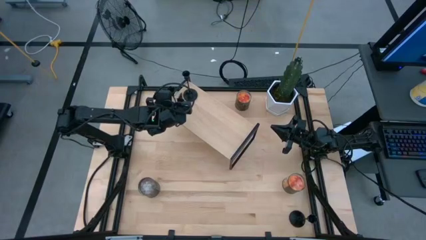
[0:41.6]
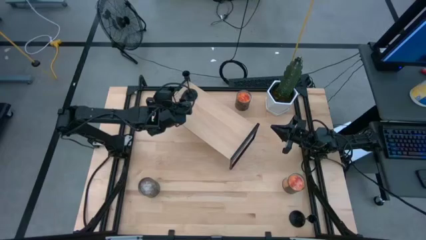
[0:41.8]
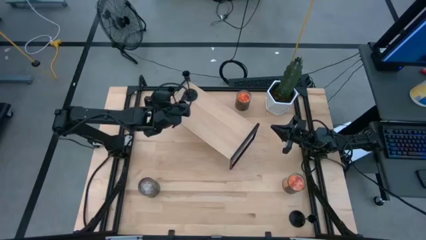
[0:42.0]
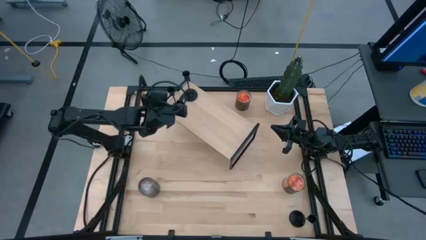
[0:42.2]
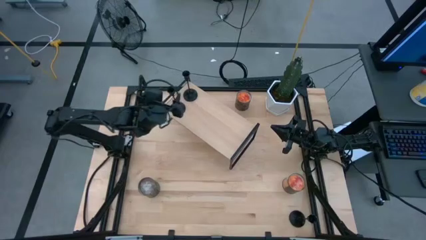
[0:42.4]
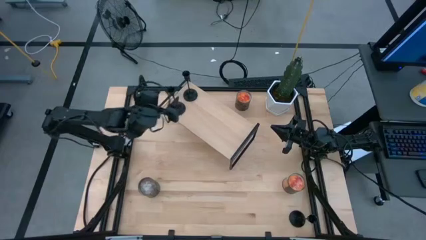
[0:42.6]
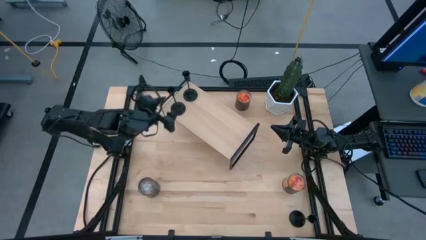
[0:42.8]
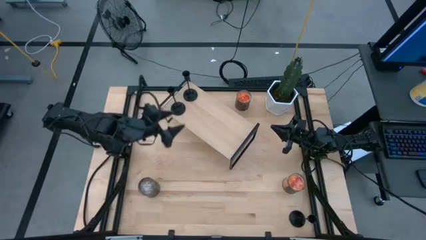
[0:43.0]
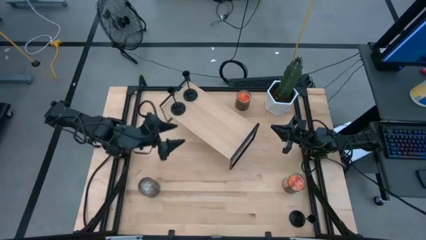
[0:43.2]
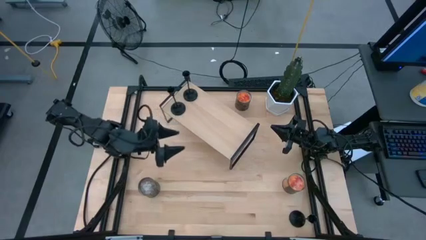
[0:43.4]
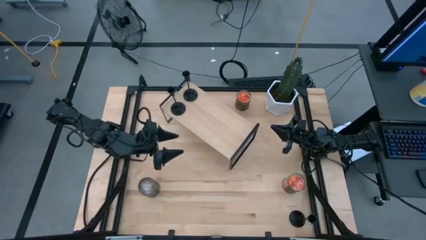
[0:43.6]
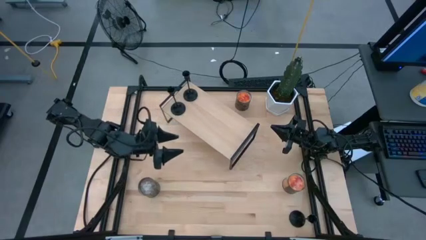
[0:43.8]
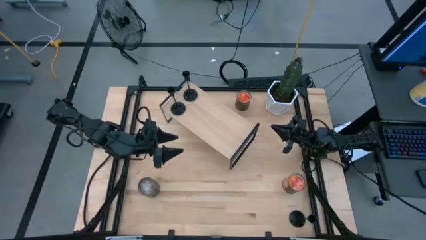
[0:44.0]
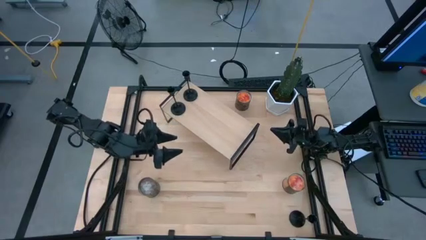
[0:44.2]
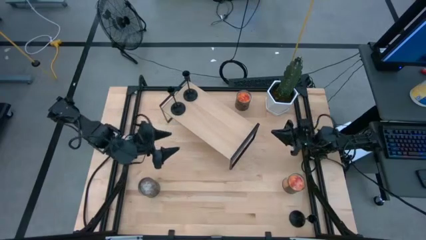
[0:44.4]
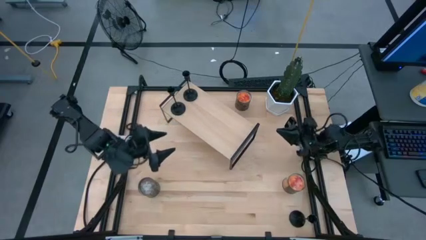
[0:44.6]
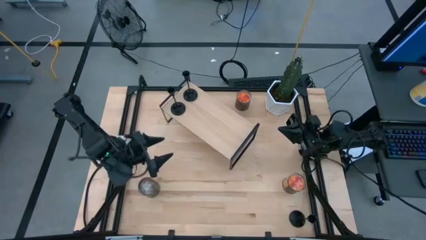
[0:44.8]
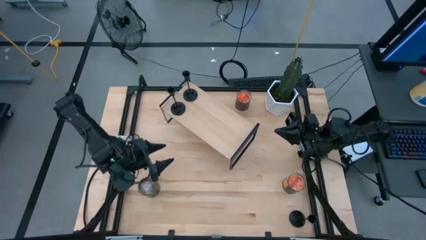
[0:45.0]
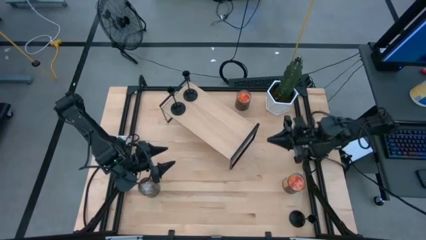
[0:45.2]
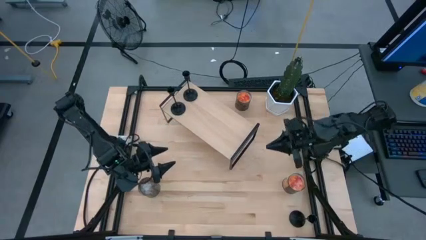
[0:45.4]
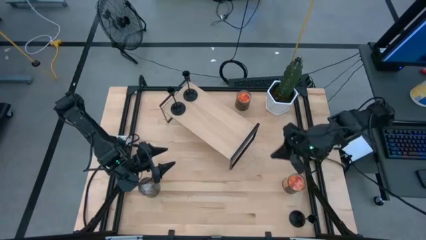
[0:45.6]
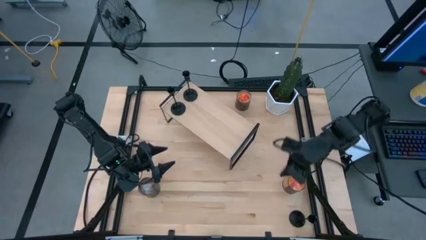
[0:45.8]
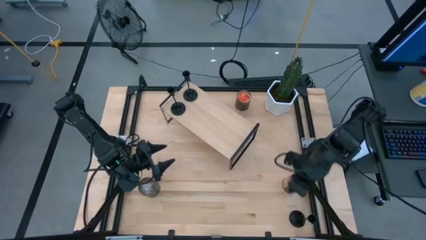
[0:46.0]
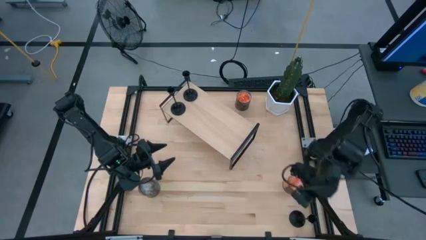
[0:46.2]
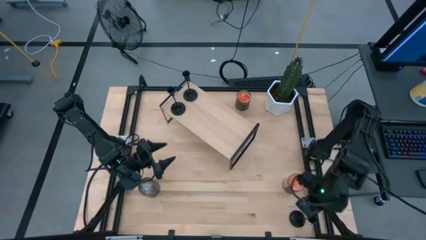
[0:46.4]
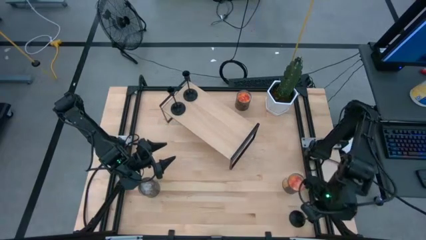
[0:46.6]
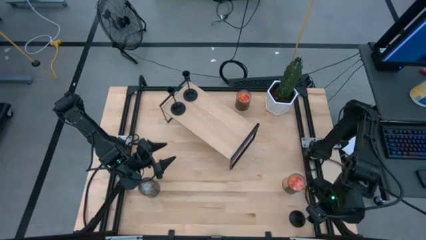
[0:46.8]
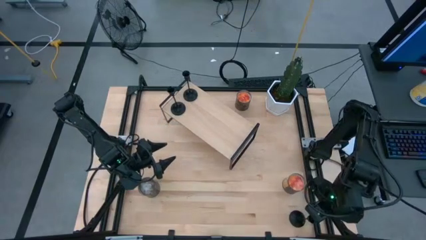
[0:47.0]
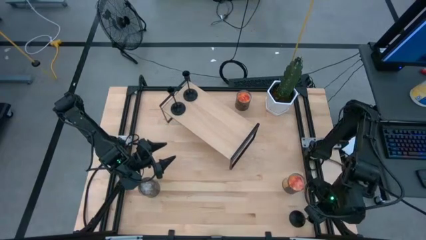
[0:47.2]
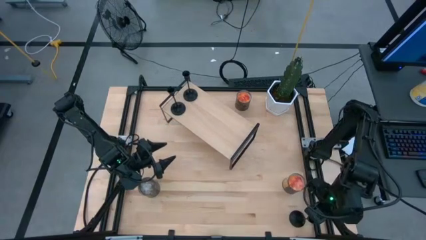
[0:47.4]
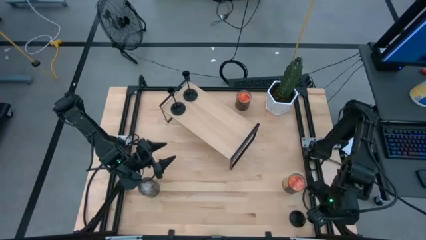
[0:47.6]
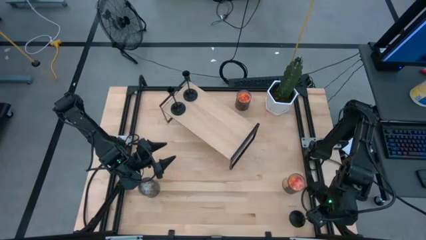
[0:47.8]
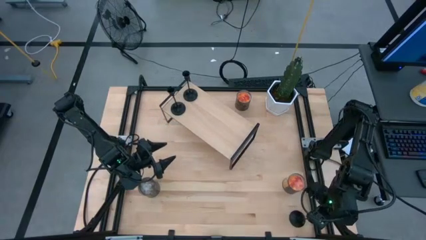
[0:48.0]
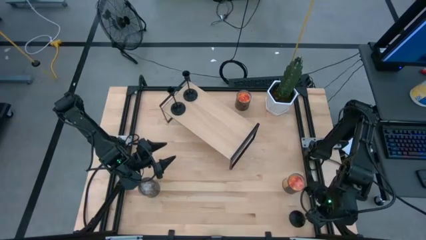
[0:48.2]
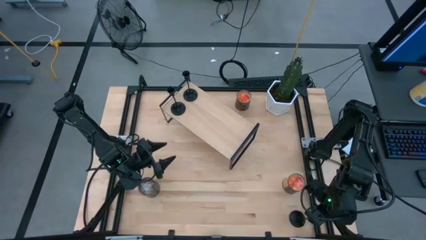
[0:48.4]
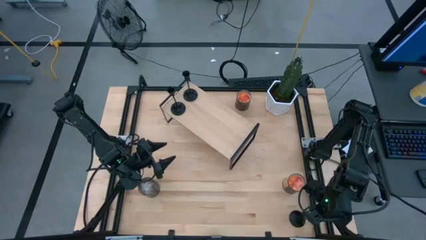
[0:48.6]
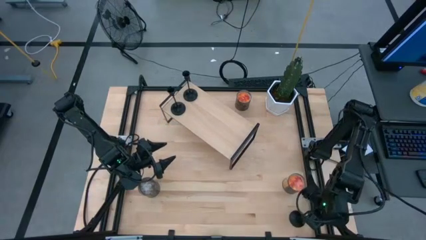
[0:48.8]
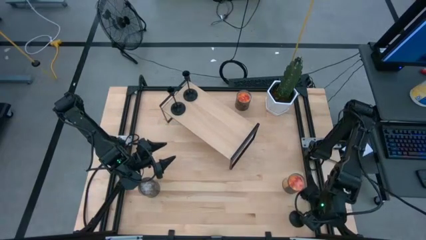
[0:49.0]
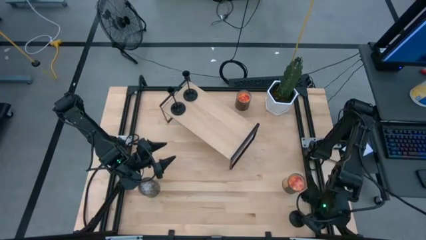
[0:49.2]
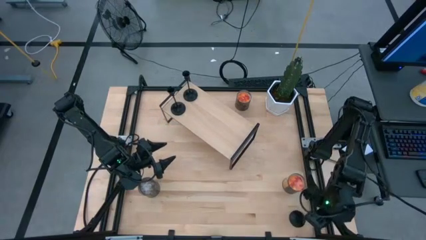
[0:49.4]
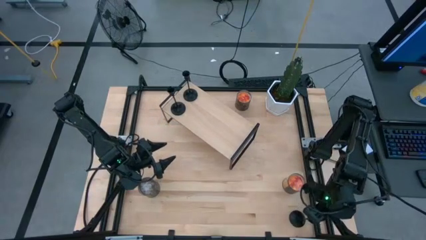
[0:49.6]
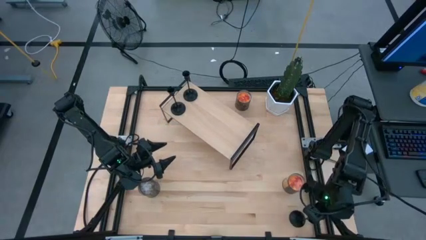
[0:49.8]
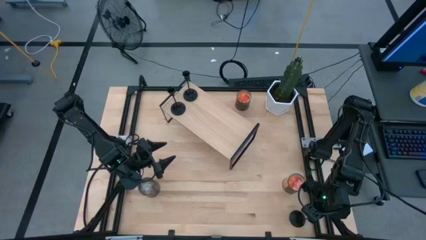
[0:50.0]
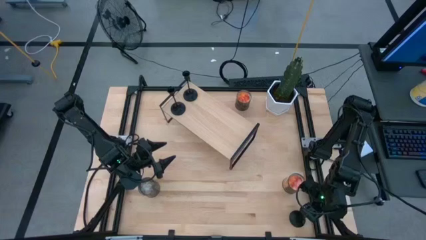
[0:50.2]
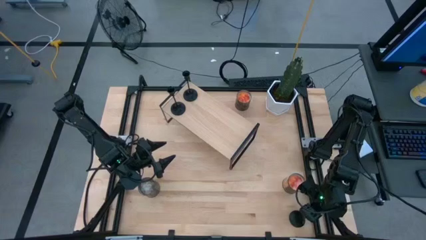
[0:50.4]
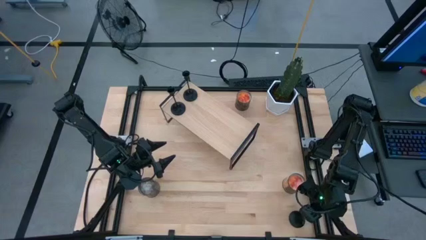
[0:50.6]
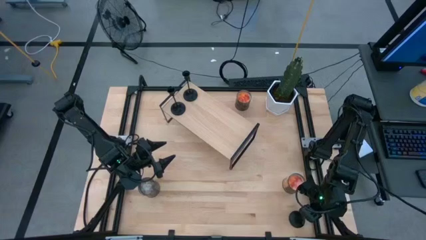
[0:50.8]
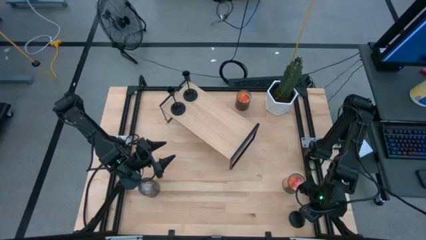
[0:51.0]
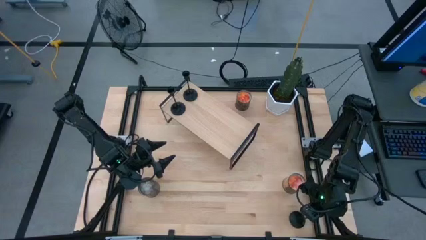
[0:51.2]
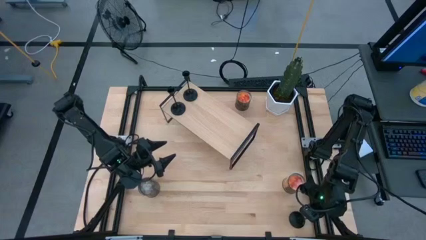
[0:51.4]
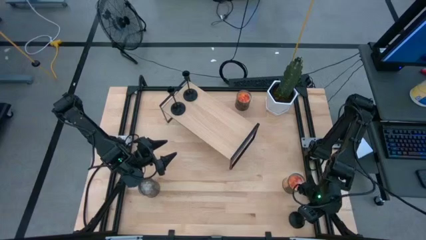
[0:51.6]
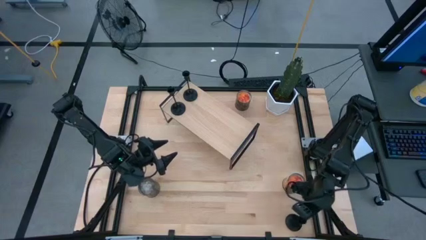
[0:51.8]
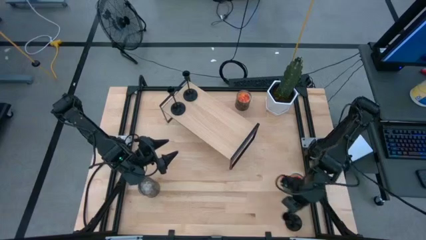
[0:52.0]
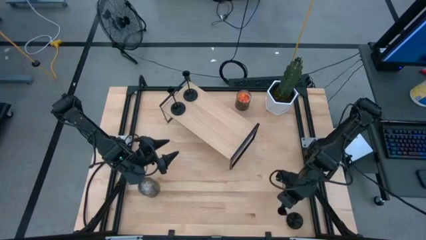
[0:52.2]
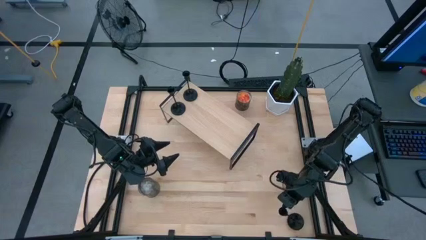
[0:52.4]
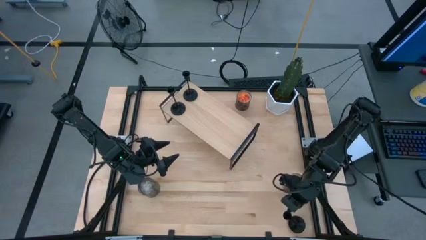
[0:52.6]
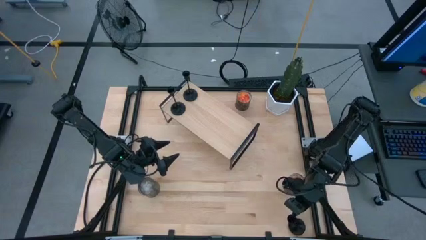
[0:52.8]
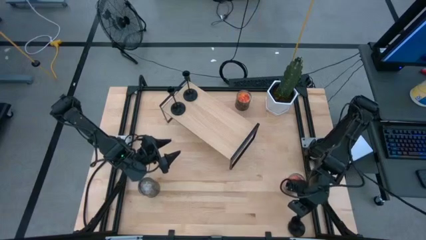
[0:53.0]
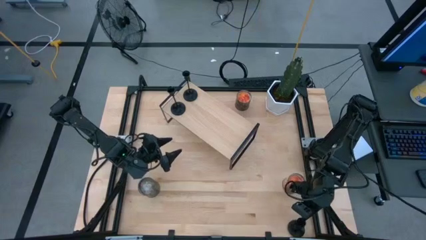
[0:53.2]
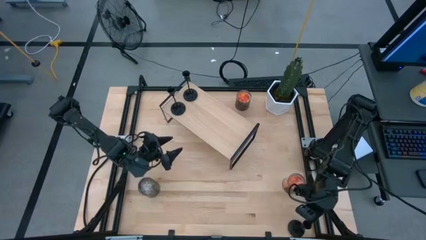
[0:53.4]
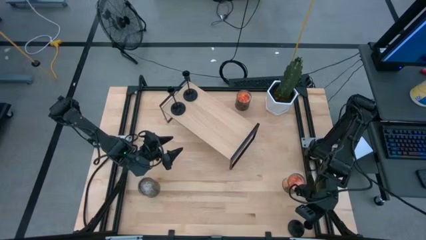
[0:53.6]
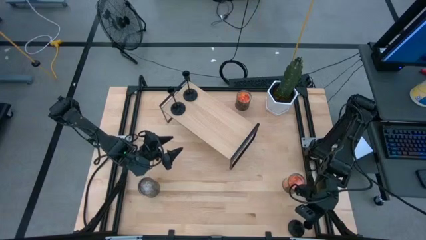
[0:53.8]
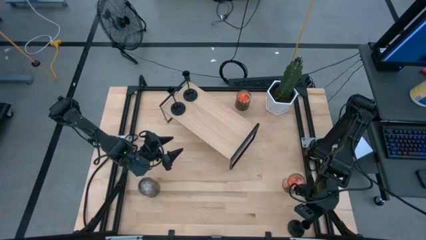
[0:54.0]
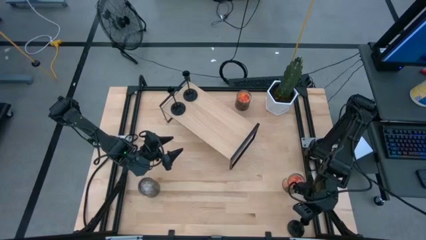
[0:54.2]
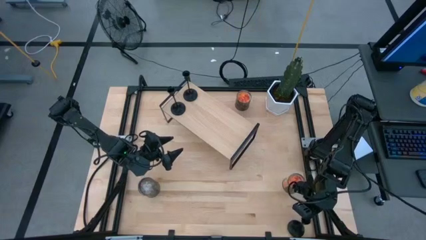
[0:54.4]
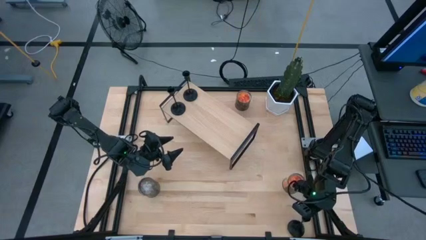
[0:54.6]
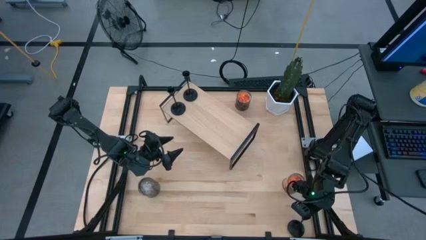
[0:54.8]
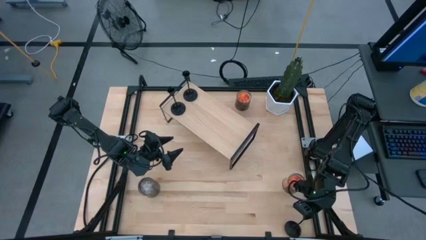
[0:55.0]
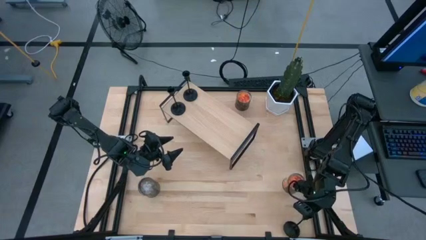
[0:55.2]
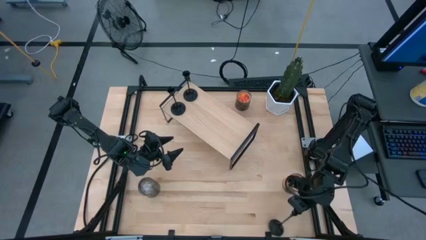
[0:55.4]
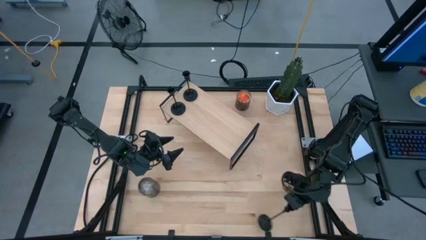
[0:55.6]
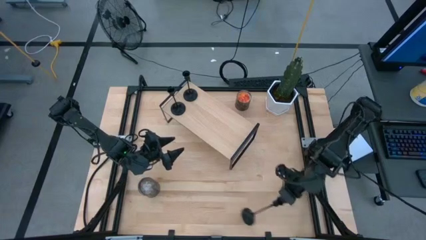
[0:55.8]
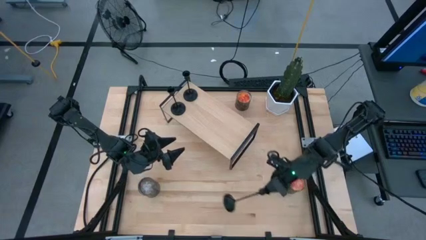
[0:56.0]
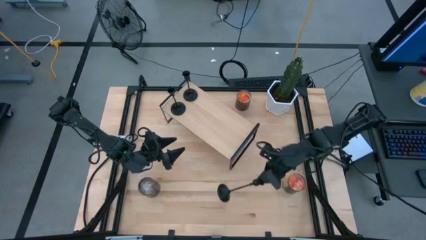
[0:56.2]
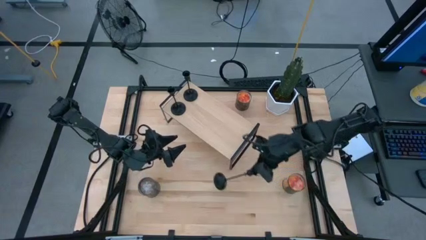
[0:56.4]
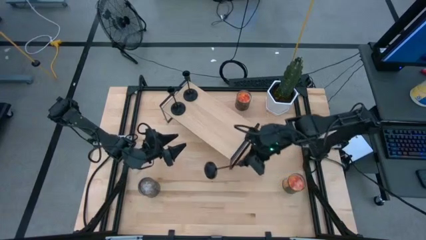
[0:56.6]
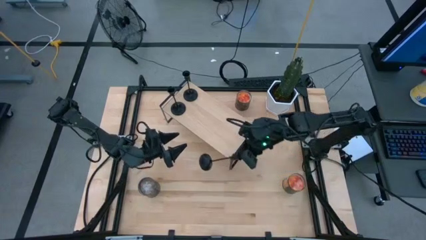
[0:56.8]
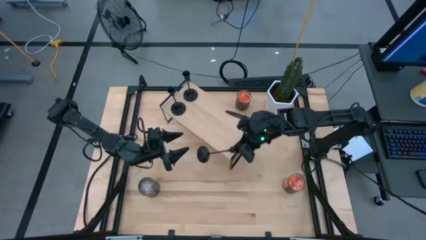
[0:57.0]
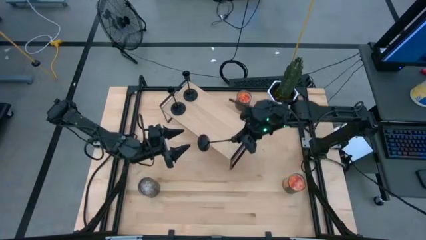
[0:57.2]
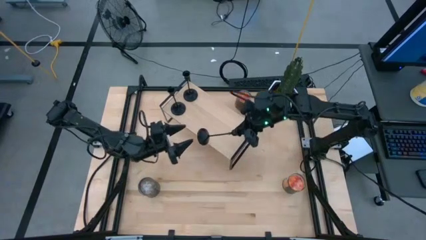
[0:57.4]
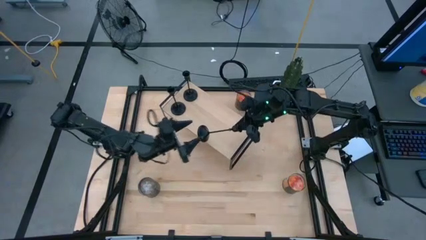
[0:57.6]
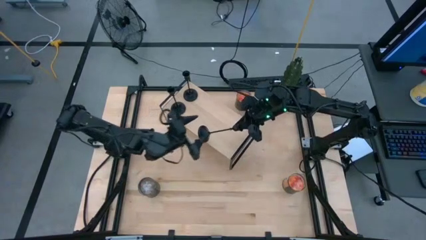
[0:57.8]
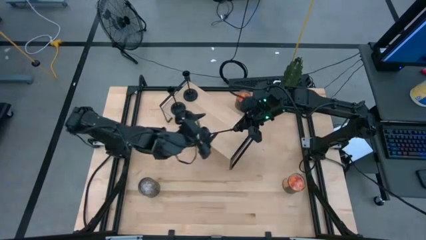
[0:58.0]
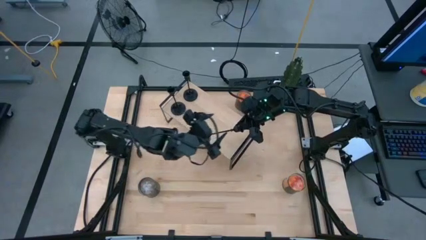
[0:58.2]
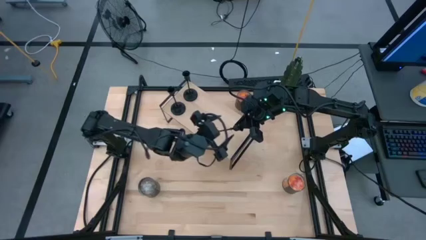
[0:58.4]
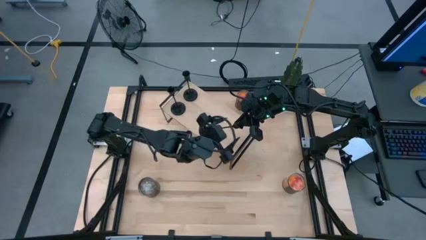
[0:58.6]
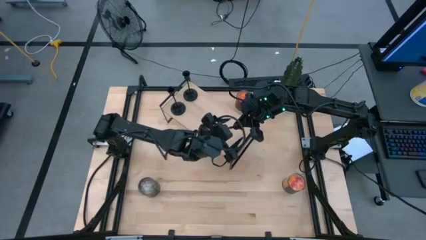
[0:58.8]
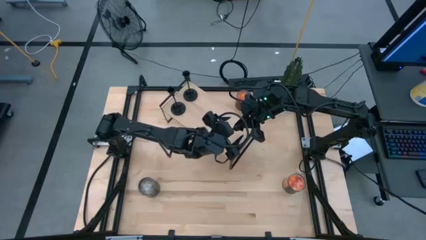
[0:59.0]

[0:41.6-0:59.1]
Task: Pick & Place candle stick holders
Put the black candle holder on the shelf
